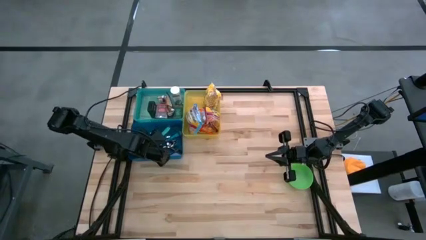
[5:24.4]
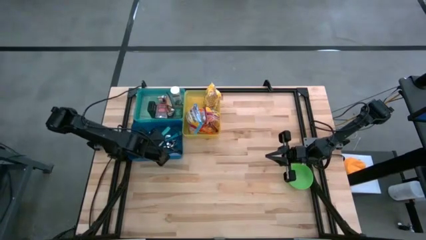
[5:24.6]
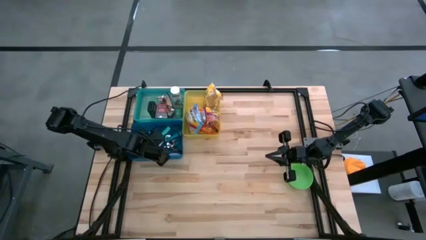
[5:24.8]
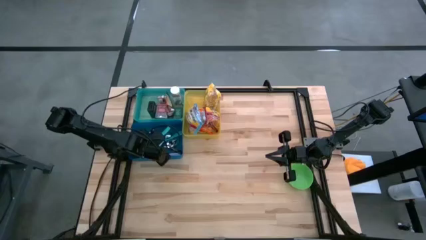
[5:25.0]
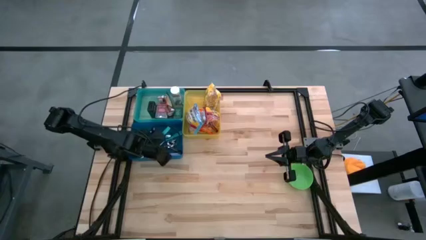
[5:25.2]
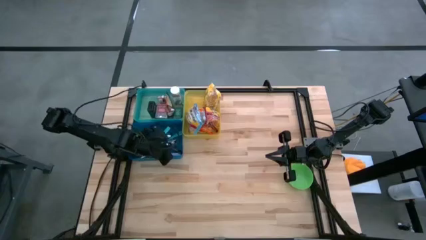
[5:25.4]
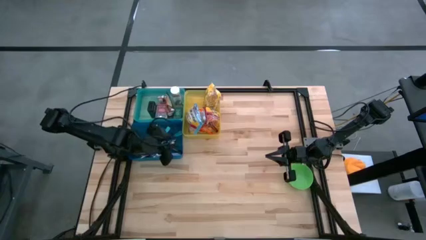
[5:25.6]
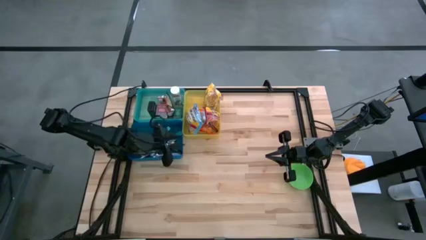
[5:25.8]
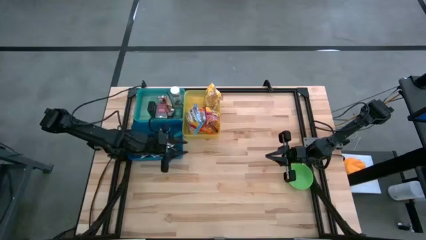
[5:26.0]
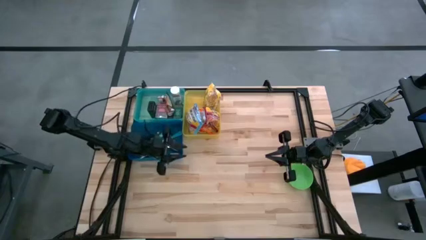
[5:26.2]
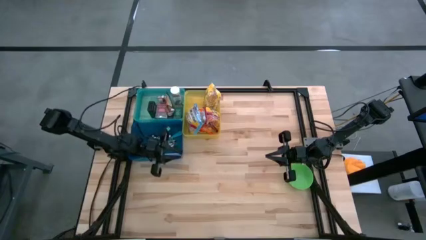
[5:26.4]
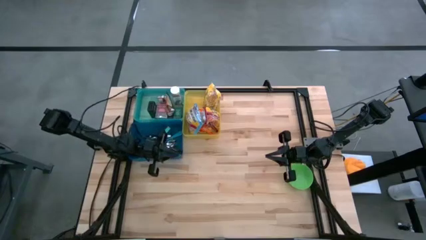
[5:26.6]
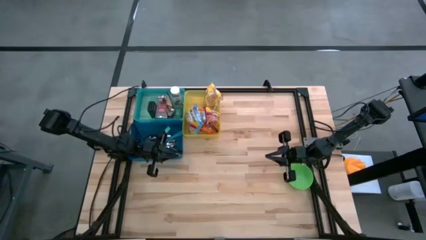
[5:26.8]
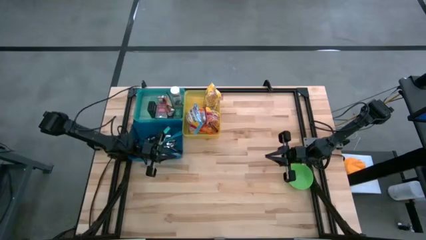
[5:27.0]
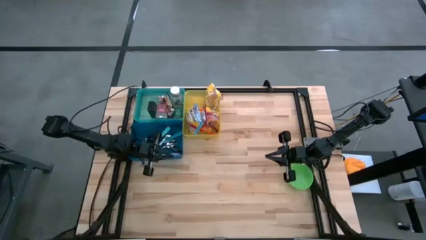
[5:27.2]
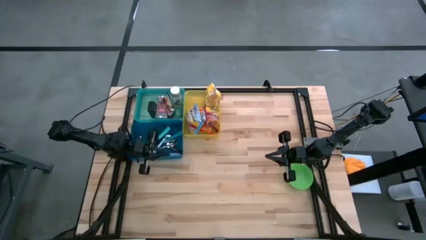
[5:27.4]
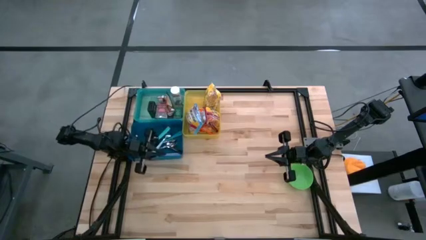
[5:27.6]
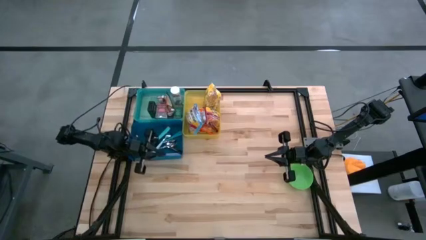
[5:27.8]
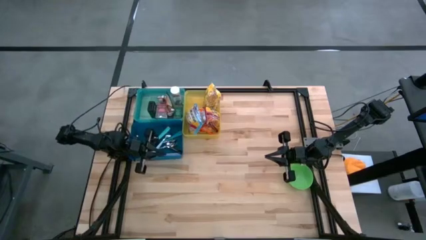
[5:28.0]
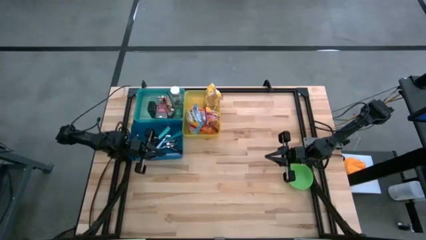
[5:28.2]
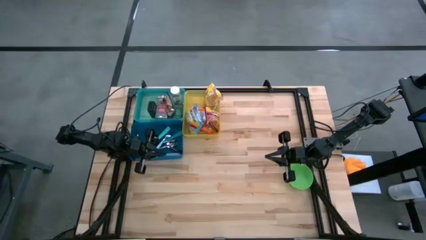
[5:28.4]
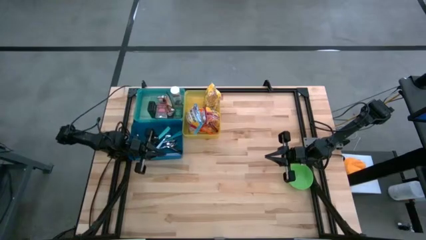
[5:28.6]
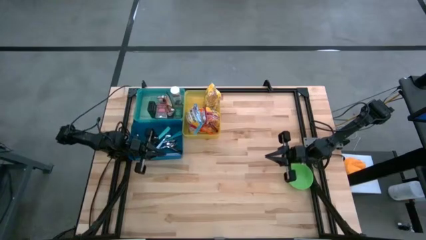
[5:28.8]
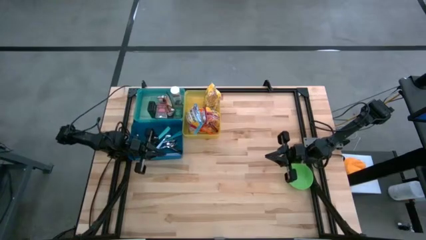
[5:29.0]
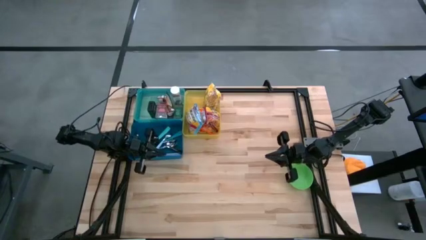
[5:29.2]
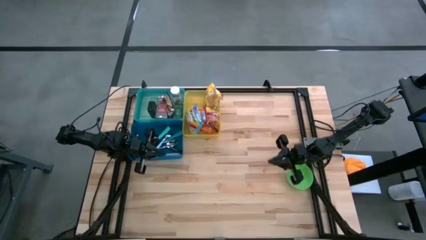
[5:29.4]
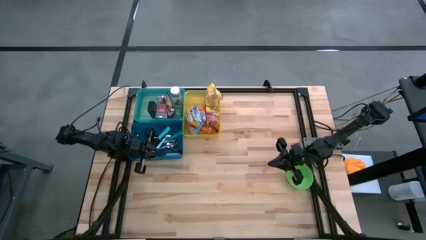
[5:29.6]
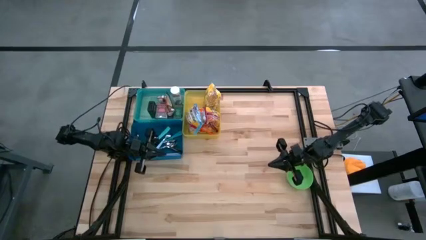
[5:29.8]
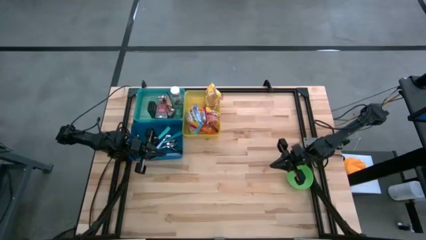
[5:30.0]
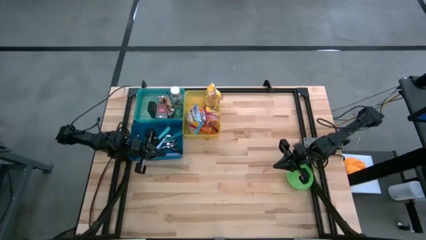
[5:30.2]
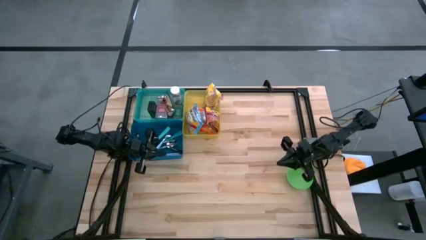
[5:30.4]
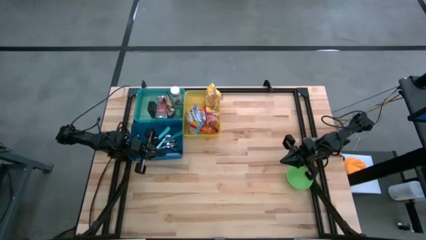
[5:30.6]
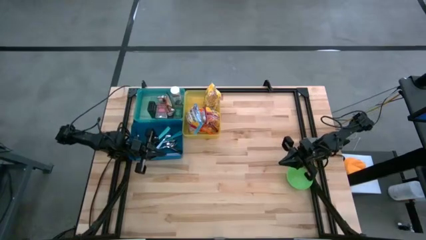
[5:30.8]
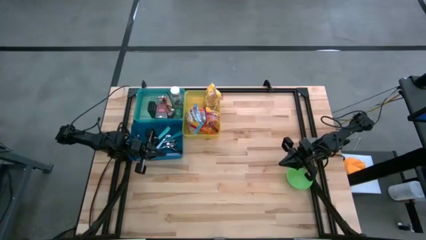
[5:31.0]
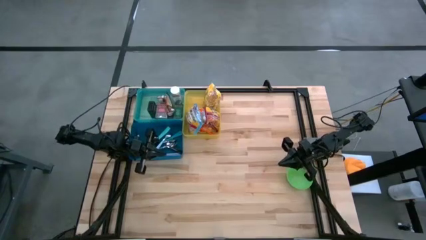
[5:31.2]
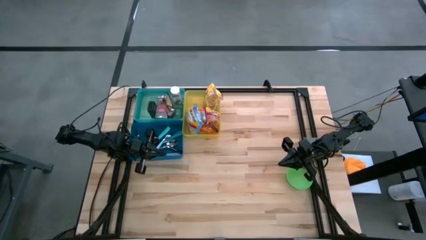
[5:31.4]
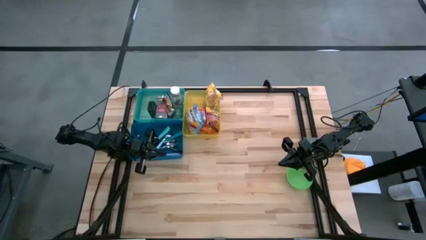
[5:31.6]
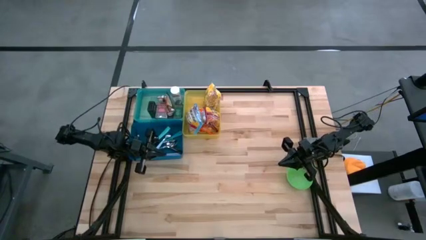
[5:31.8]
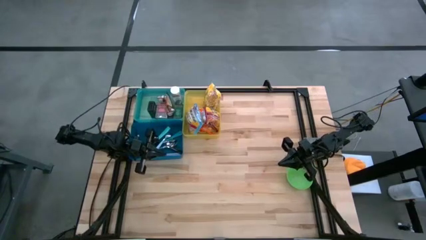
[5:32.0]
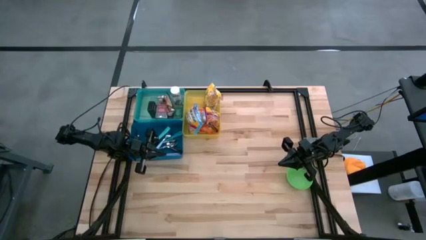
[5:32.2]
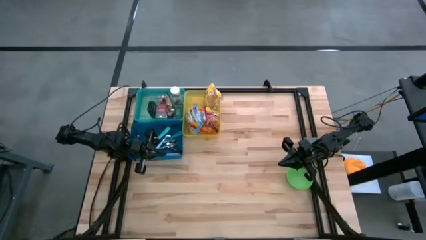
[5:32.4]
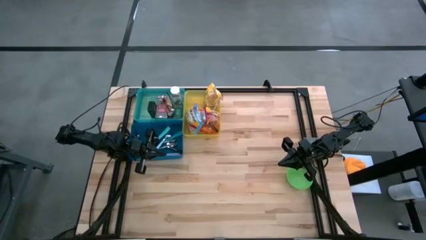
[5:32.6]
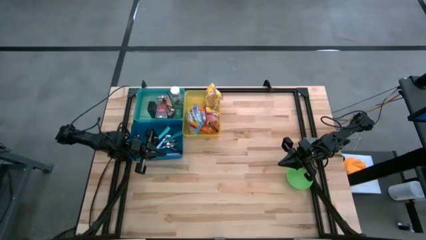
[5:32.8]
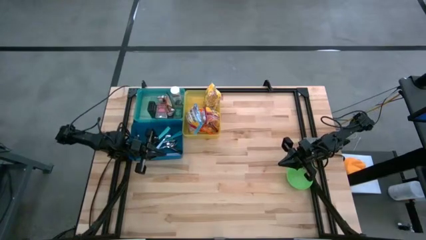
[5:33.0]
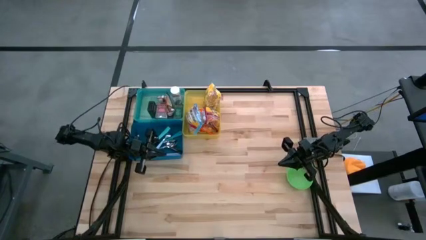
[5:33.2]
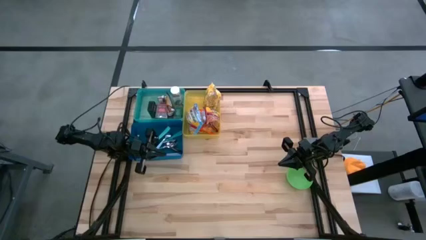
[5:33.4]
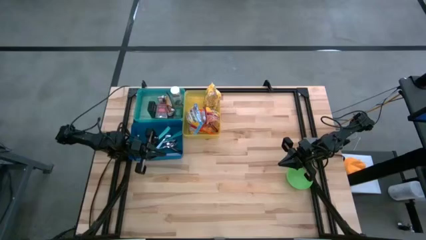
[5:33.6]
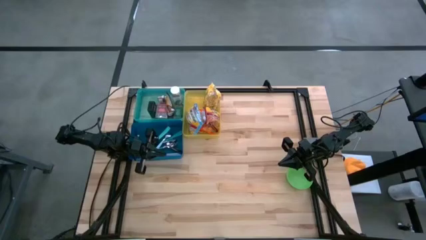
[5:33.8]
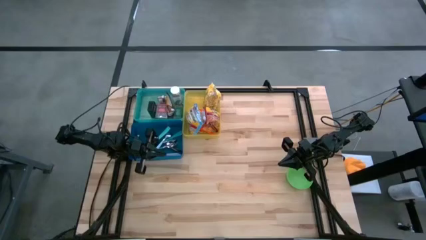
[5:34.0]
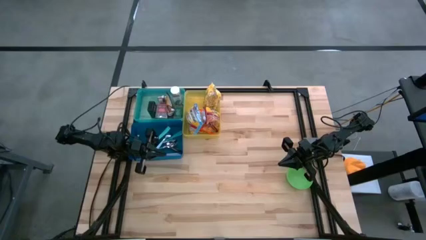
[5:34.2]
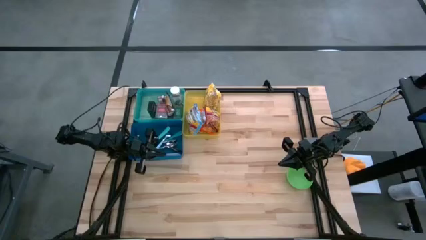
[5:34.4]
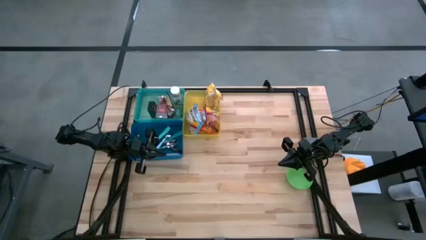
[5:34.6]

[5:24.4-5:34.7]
Return to Home Position
